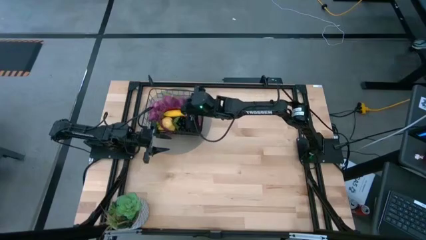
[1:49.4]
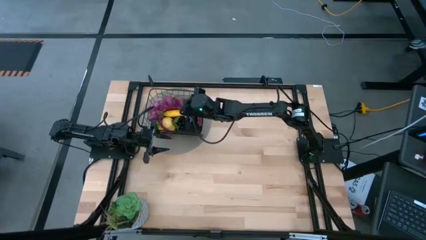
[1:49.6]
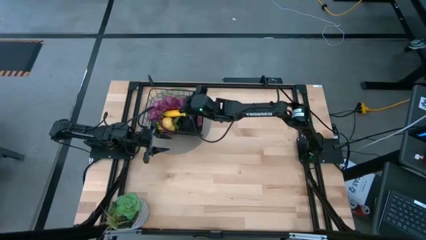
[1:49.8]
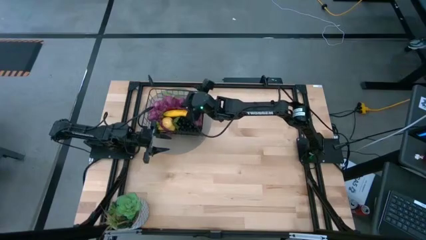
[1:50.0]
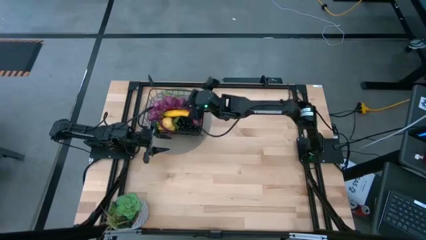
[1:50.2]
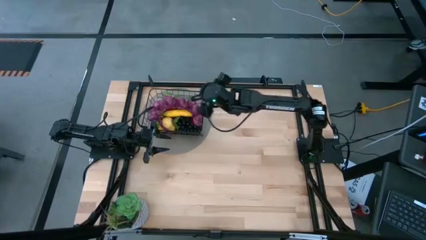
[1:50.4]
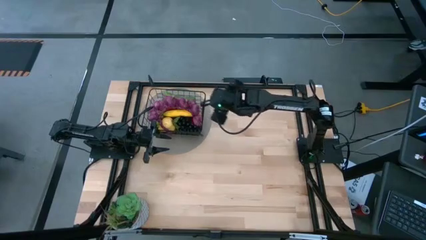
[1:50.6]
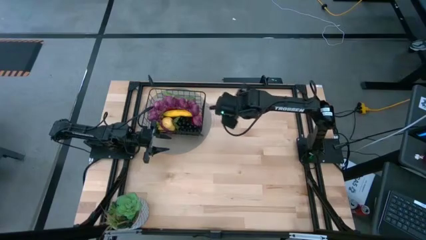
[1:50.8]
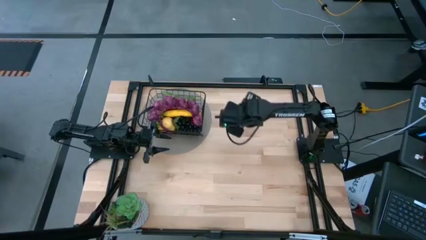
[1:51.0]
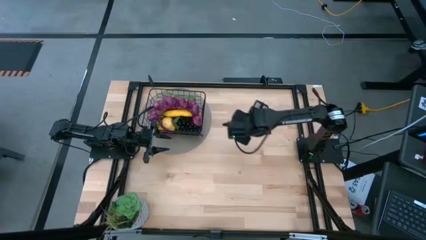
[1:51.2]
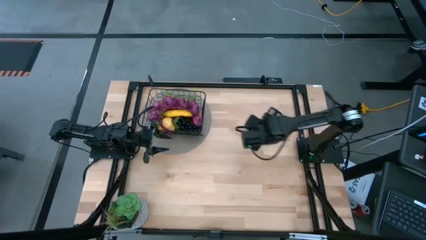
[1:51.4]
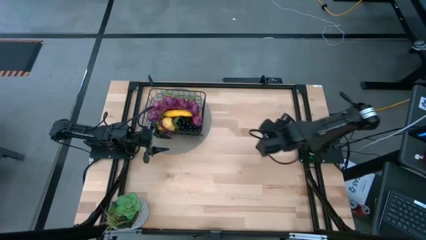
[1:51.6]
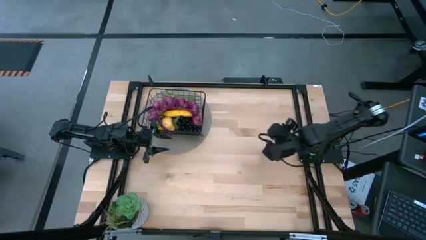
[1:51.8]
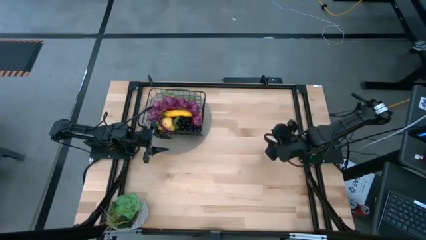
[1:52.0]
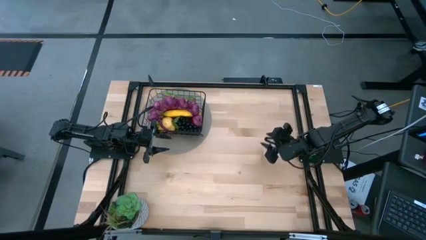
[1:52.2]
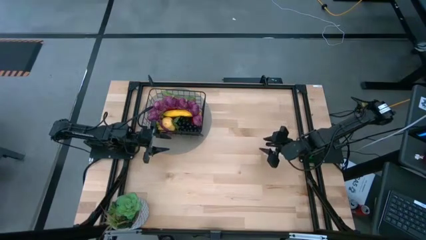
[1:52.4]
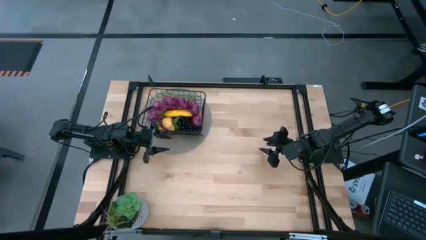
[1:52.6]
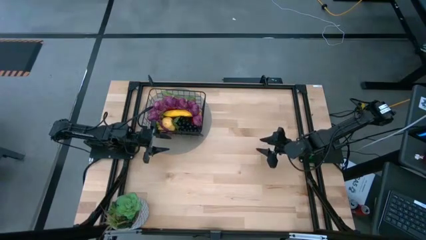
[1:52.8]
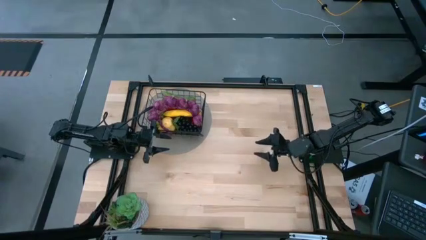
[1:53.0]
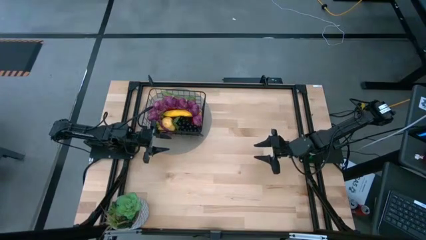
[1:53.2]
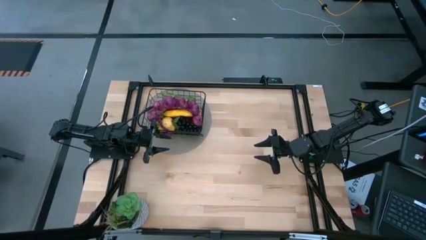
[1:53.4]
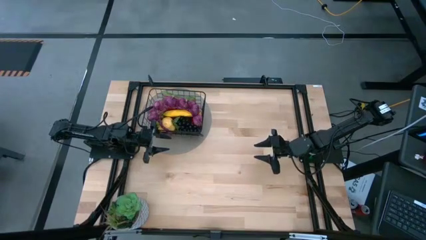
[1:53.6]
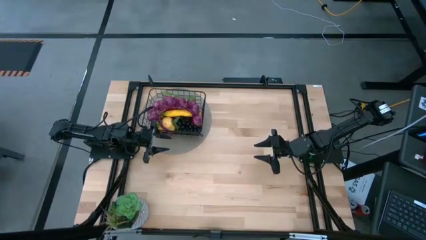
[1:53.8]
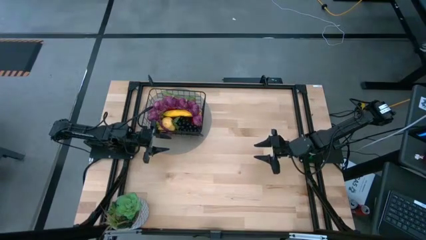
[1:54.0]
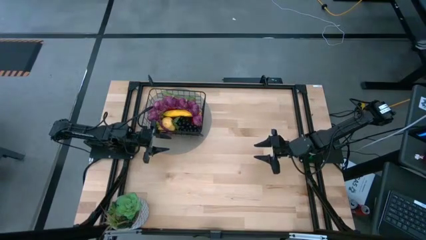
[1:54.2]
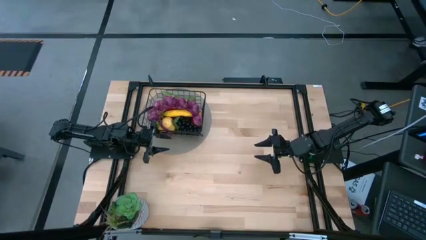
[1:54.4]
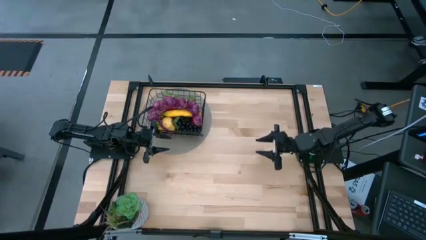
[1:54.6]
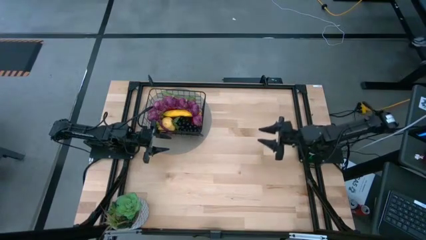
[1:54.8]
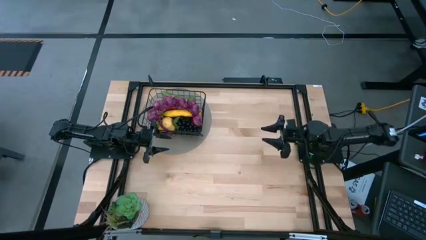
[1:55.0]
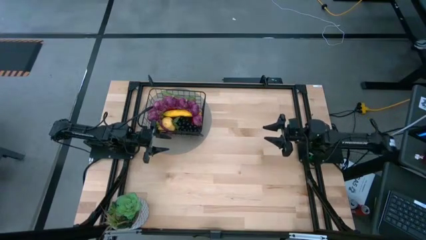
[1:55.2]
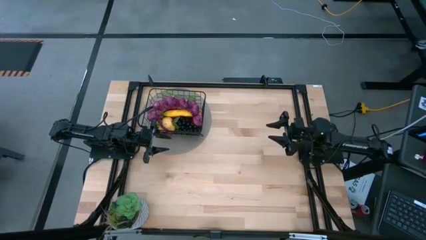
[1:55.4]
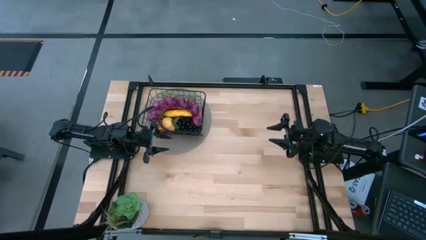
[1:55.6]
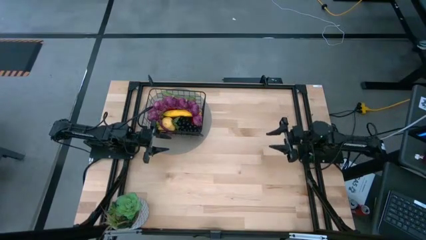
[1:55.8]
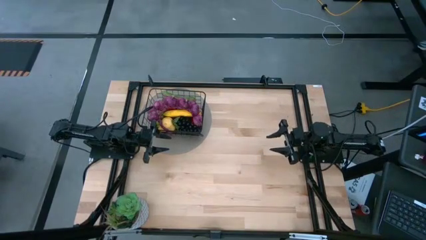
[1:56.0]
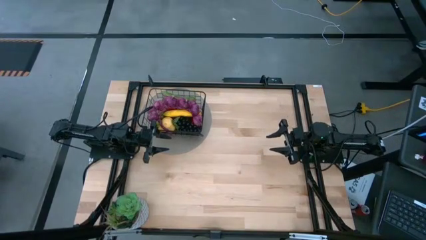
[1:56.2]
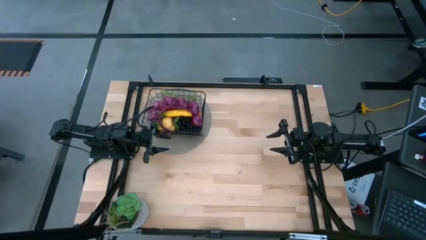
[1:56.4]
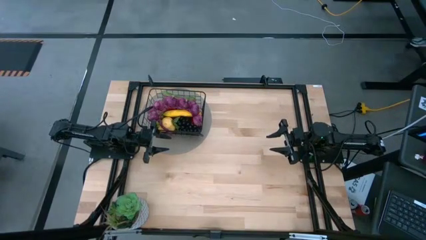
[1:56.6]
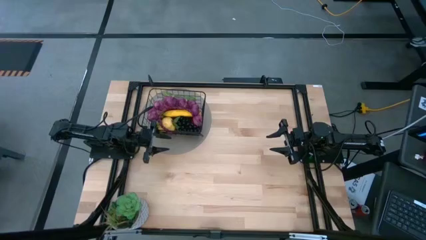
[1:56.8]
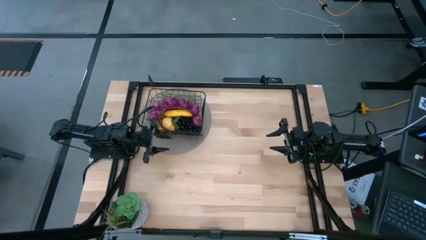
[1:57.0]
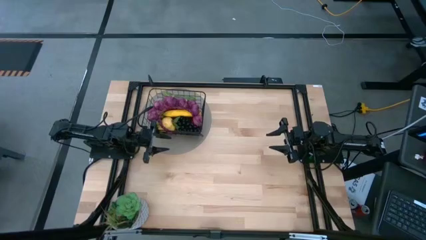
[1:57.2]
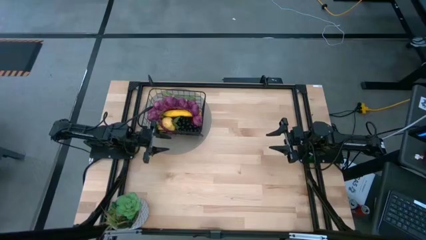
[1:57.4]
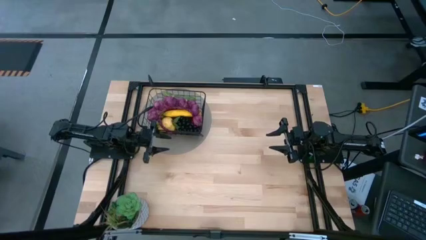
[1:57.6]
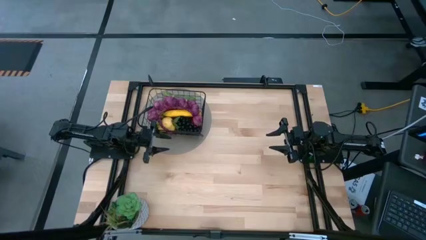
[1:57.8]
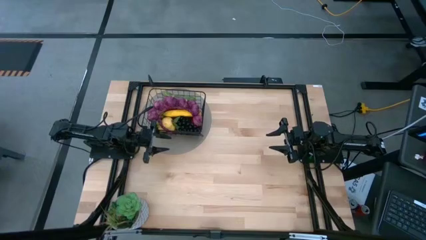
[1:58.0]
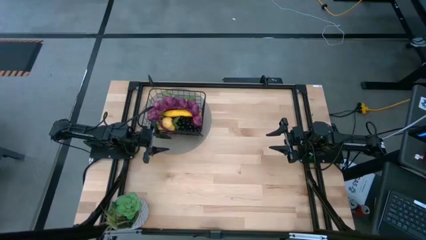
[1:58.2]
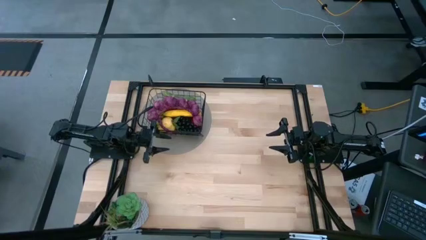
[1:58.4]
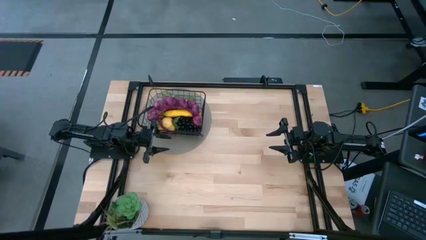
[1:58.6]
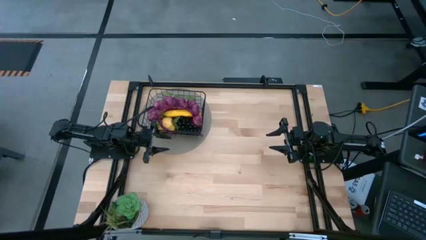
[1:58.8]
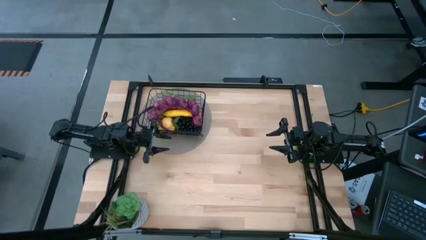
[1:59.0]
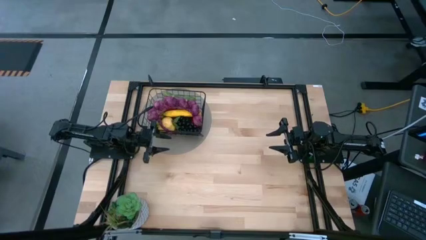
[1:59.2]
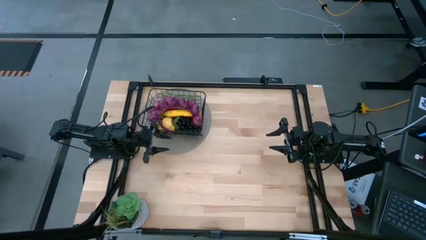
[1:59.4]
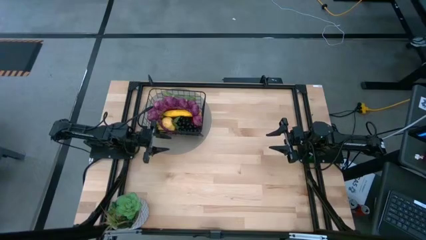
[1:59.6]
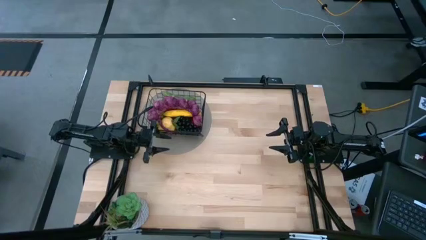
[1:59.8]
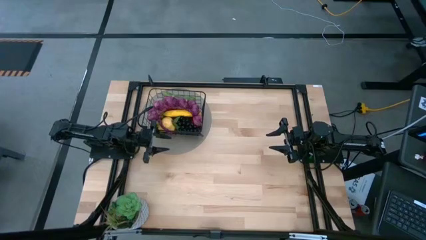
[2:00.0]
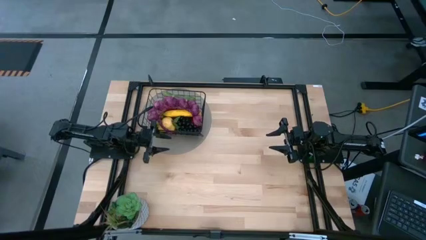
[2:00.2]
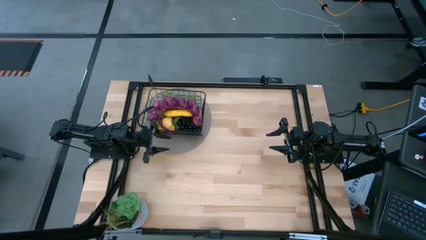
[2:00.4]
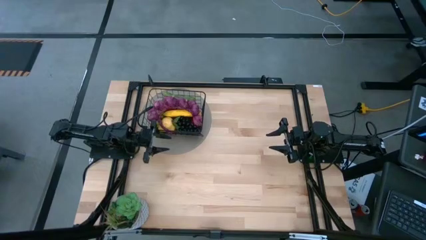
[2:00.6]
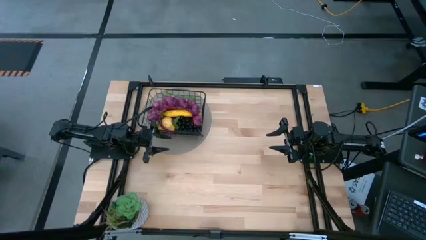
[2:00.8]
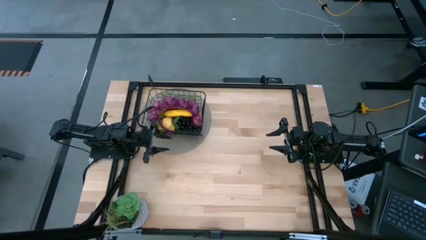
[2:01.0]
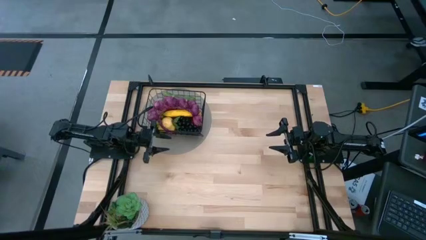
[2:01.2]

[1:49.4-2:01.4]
Task: Build produce basket
Return to Home Position
